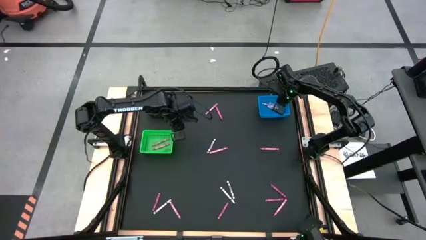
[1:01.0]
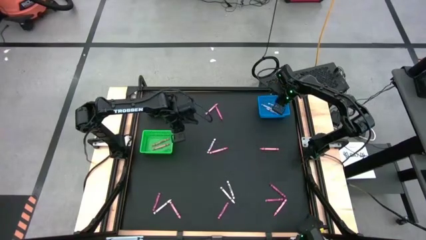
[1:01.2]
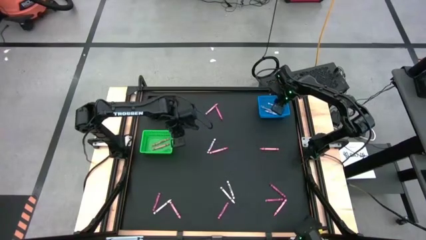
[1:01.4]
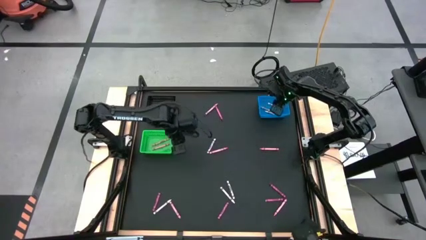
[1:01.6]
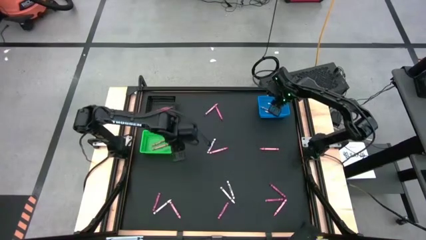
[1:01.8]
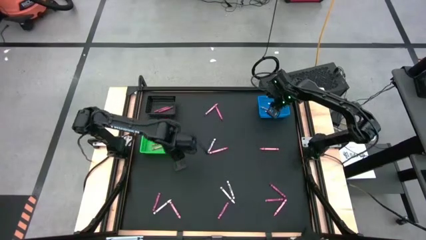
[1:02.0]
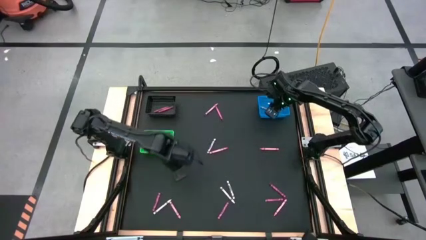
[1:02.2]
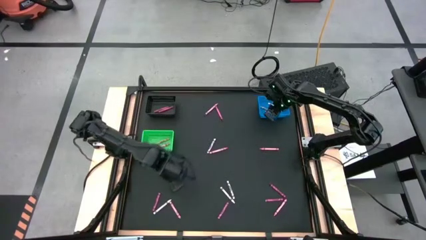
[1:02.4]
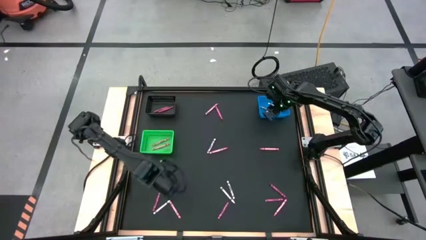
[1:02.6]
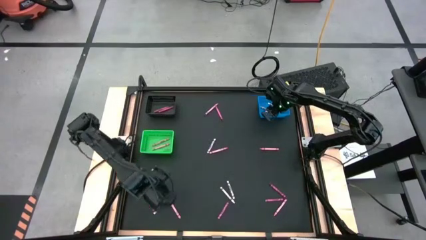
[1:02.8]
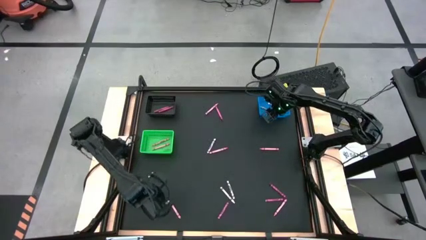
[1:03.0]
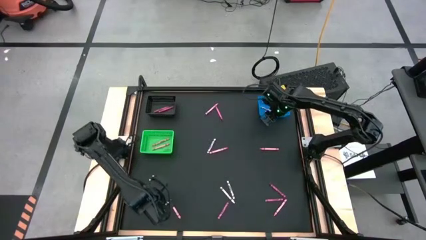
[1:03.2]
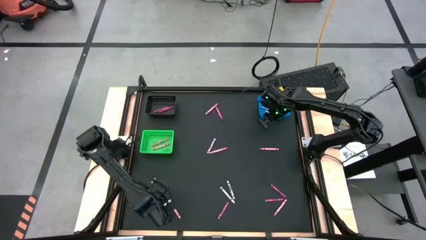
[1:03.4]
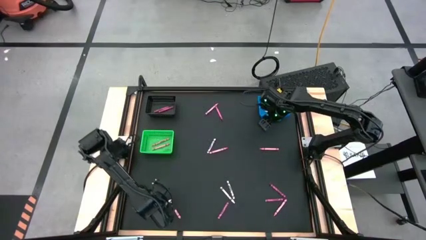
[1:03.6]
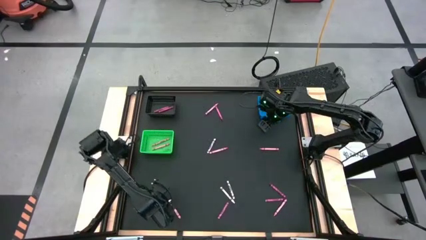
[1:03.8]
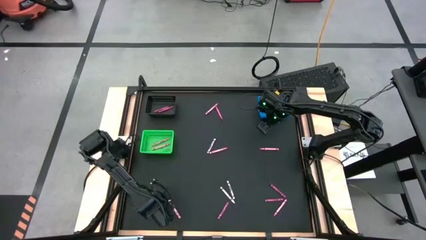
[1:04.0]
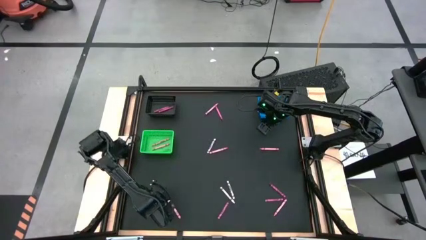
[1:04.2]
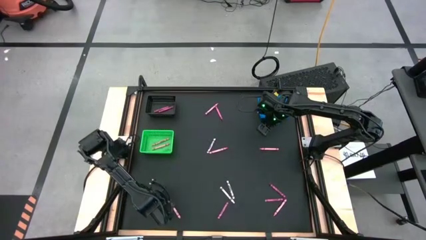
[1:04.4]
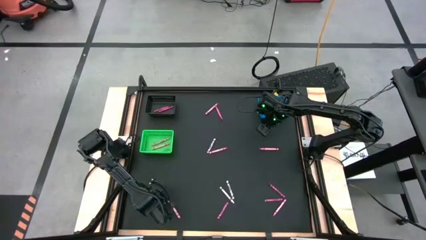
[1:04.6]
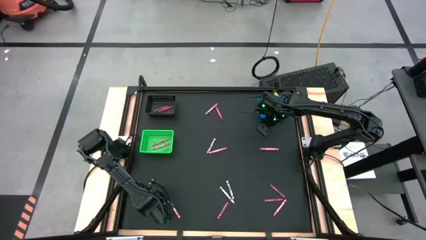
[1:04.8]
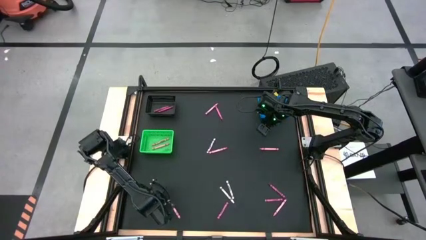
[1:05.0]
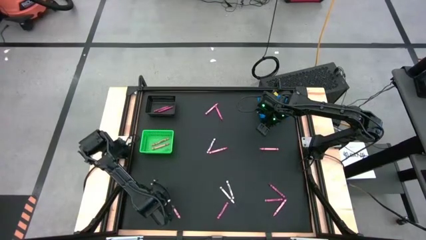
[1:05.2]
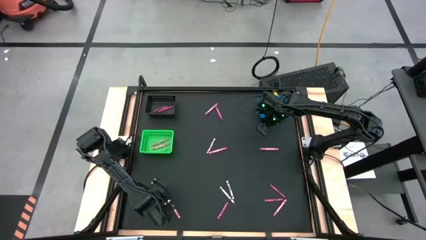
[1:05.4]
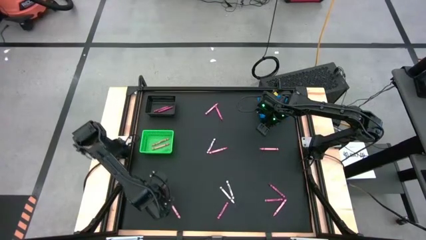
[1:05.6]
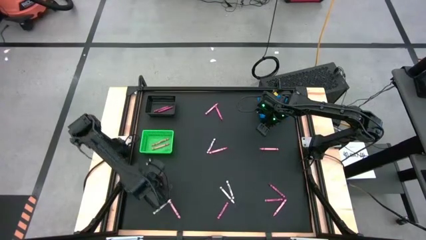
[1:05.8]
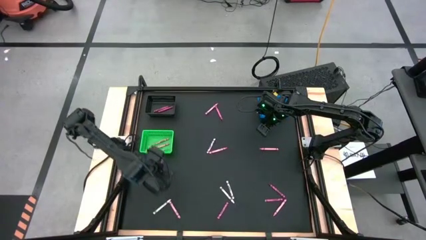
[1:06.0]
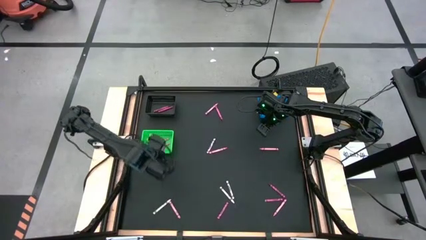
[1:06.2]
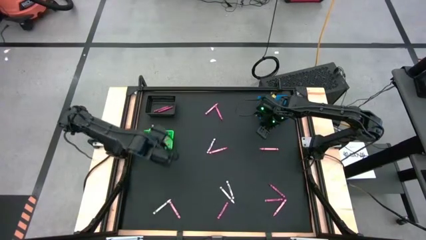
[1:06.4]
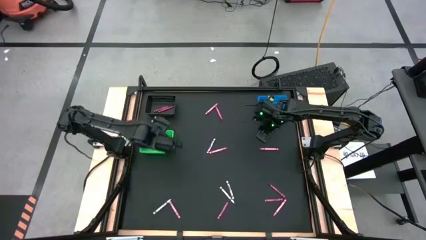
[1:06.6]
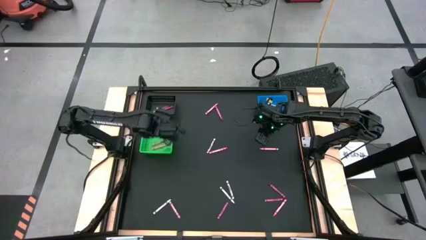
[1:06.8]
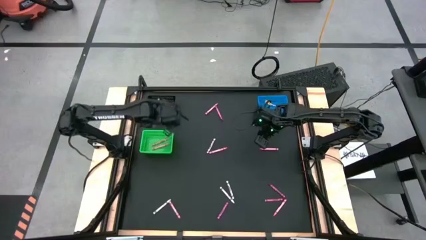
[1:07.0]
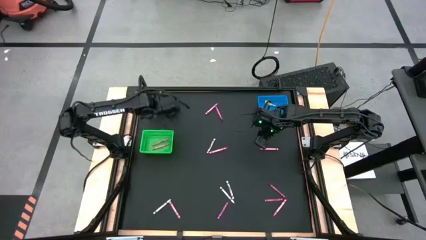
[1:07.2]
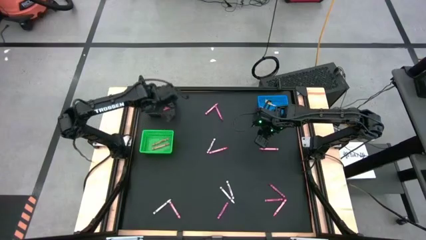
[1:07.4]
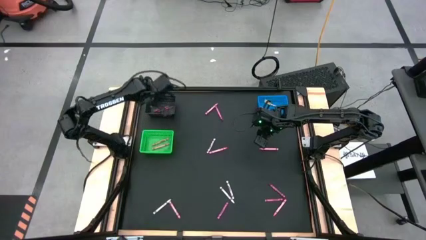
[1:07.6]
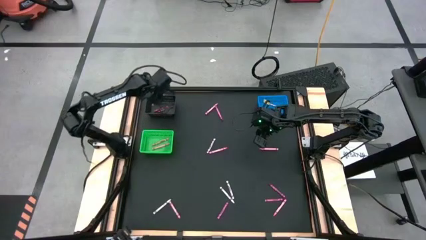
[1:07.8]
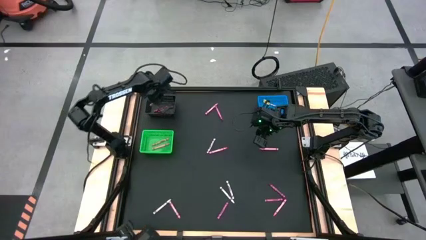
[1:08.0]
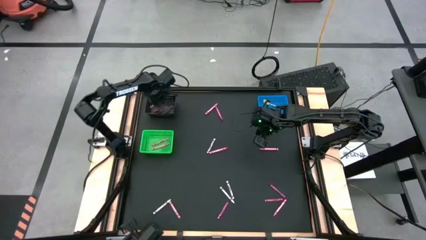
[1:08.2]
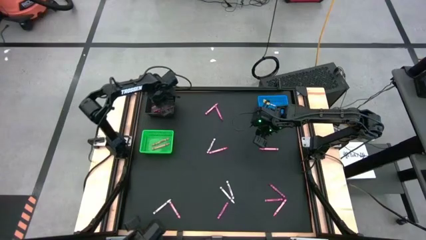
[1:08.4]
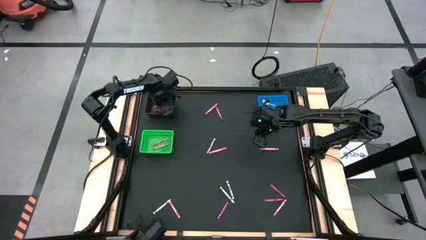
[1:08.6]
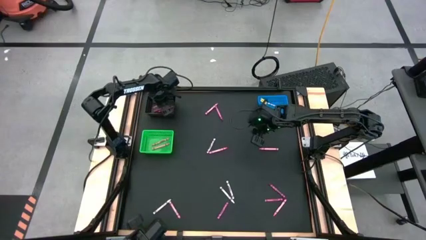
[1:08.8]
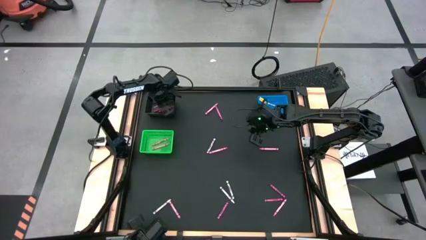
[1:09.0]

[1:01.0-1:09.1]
Task: Sort crayons
Put the red crayon into the black bin

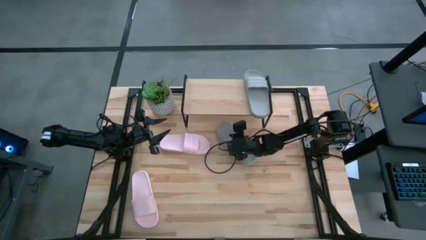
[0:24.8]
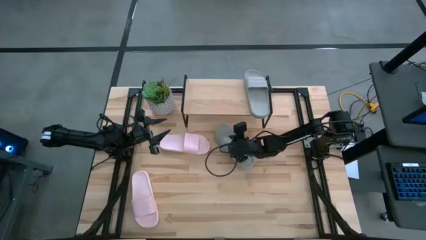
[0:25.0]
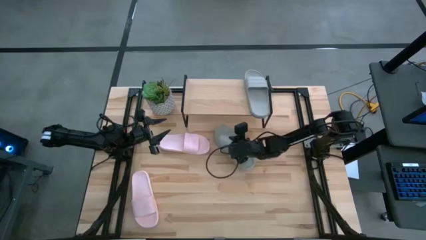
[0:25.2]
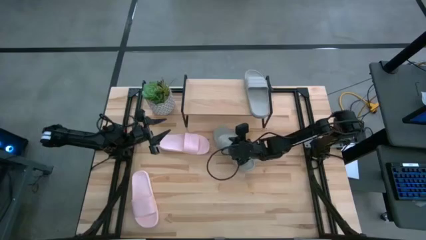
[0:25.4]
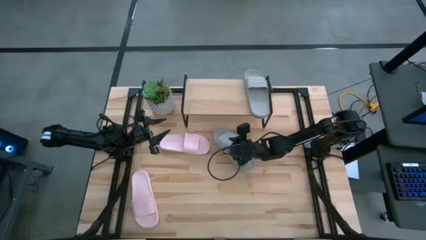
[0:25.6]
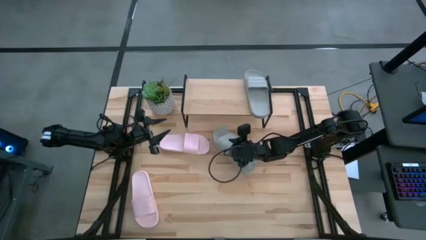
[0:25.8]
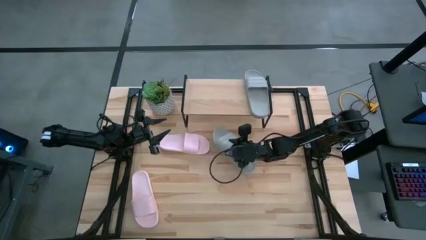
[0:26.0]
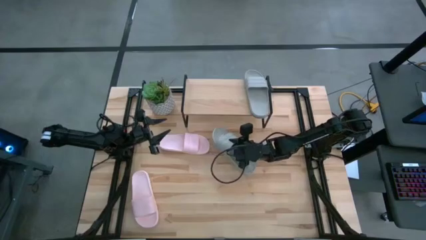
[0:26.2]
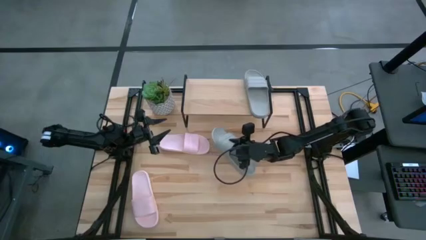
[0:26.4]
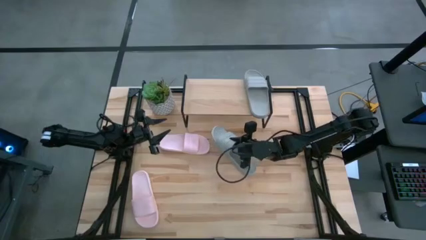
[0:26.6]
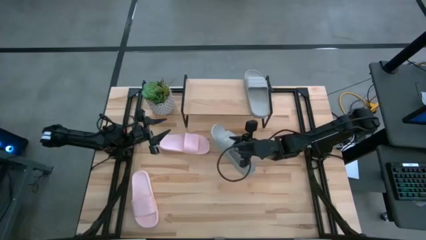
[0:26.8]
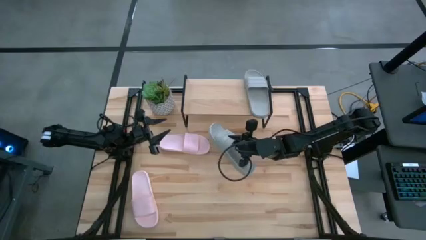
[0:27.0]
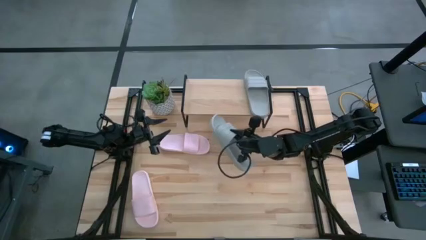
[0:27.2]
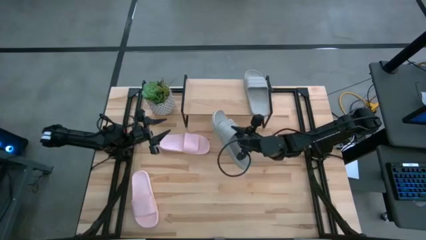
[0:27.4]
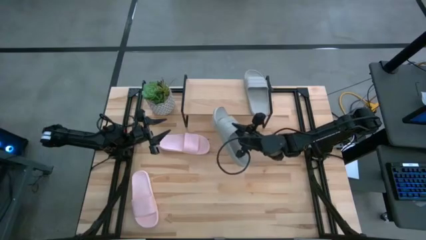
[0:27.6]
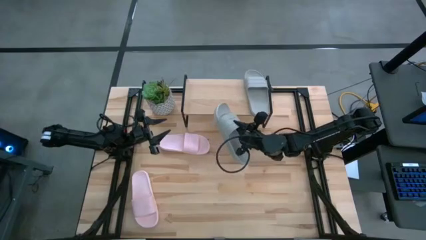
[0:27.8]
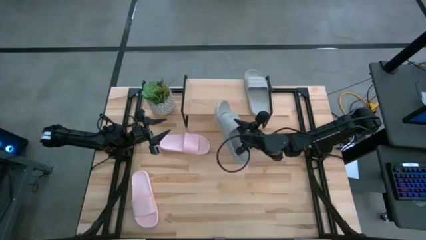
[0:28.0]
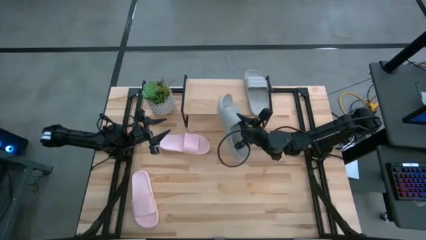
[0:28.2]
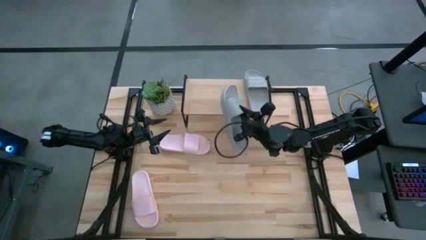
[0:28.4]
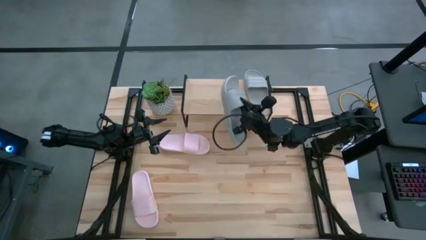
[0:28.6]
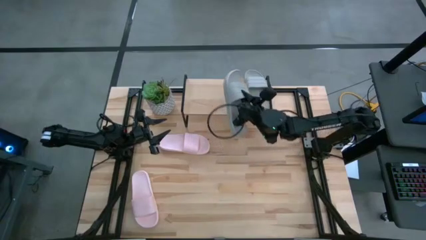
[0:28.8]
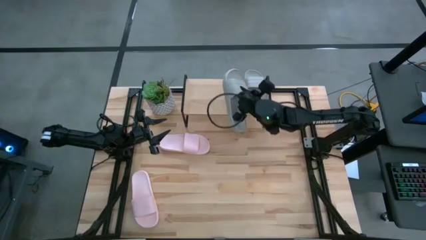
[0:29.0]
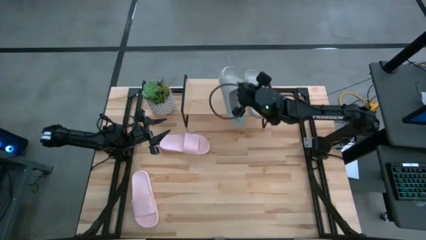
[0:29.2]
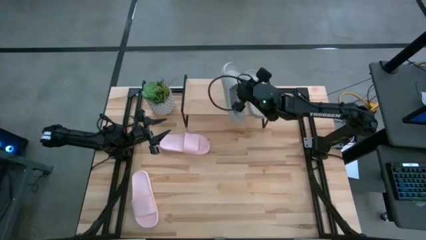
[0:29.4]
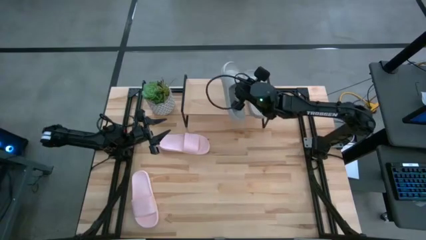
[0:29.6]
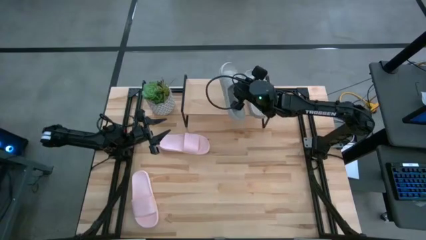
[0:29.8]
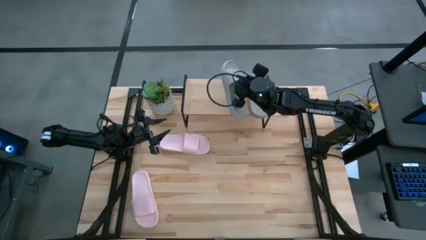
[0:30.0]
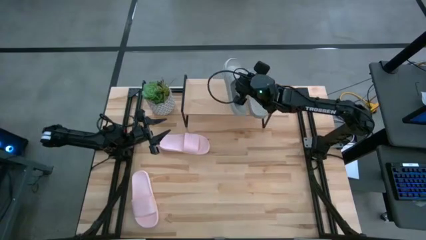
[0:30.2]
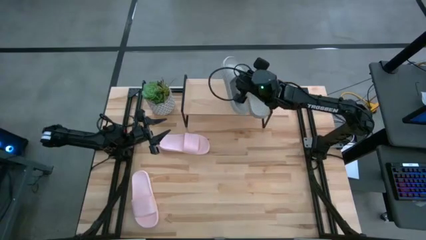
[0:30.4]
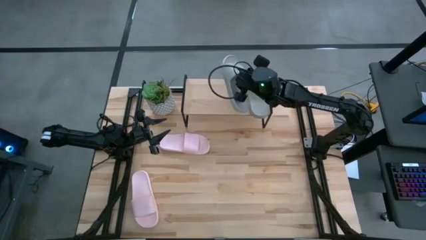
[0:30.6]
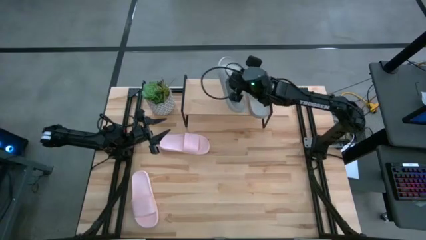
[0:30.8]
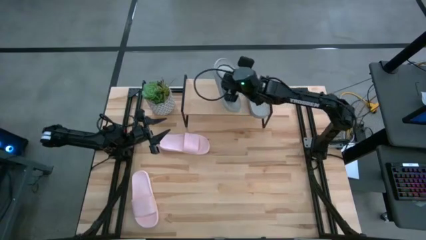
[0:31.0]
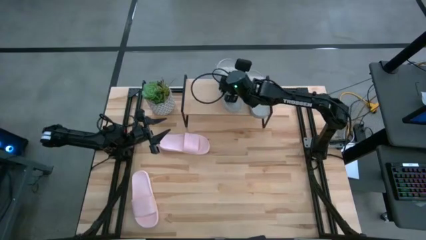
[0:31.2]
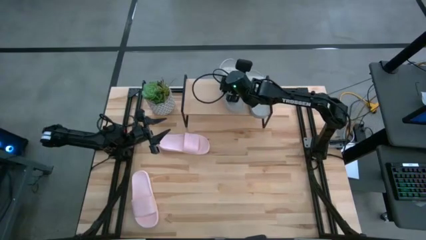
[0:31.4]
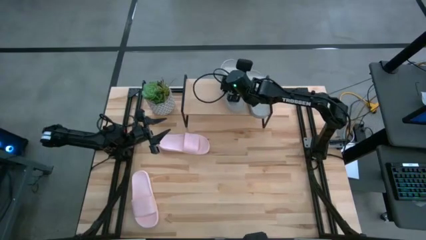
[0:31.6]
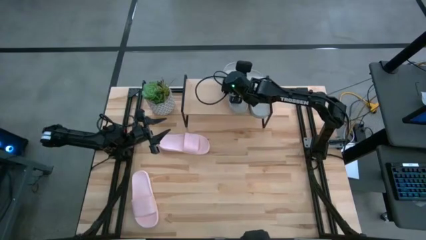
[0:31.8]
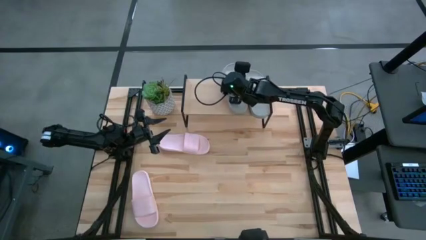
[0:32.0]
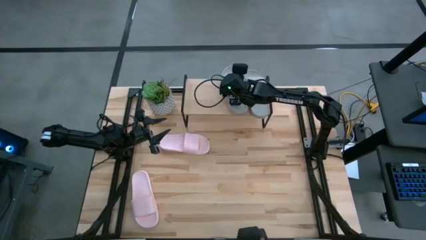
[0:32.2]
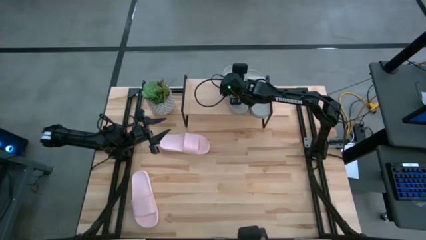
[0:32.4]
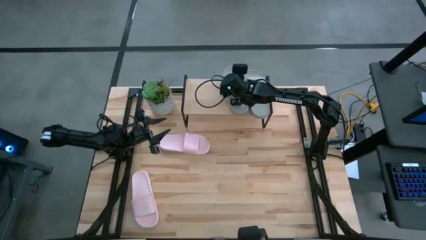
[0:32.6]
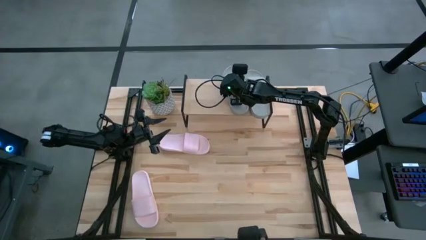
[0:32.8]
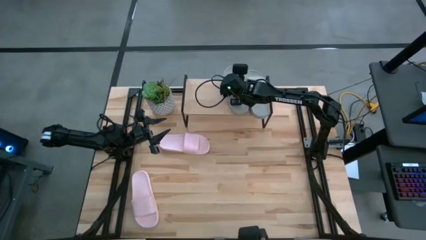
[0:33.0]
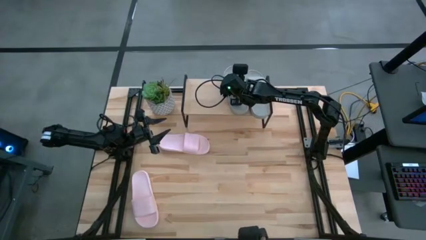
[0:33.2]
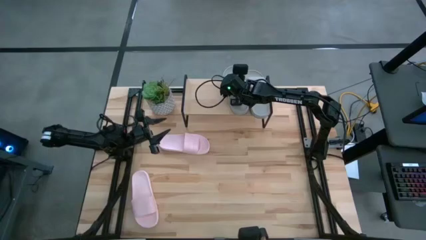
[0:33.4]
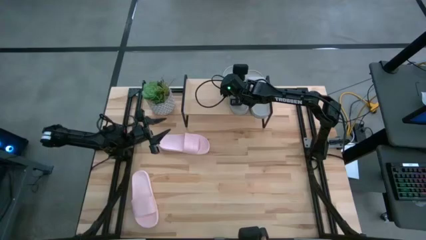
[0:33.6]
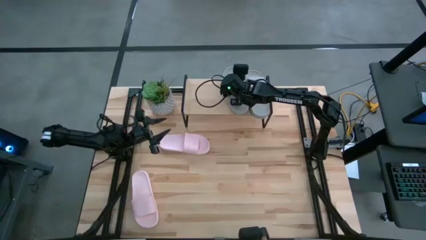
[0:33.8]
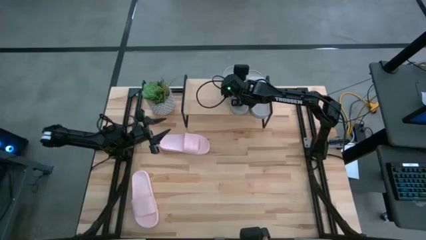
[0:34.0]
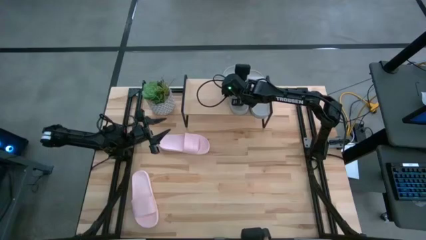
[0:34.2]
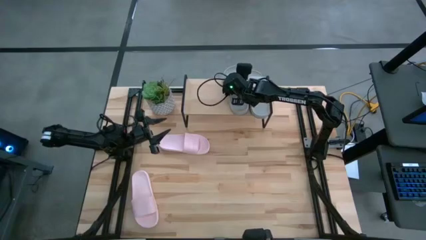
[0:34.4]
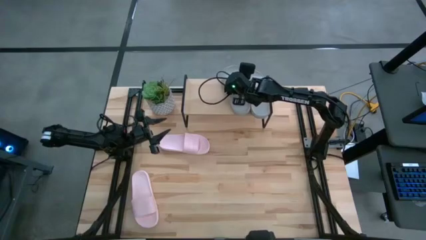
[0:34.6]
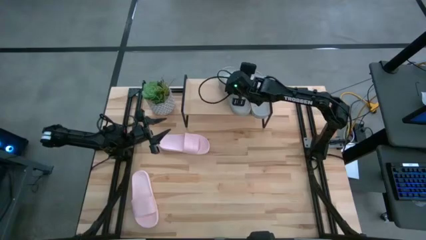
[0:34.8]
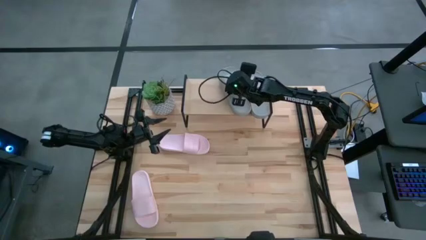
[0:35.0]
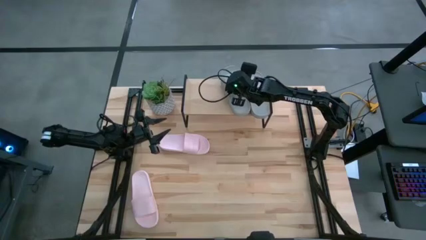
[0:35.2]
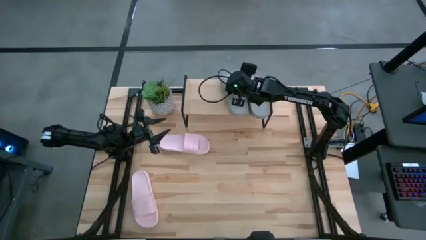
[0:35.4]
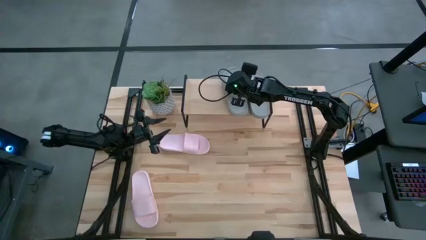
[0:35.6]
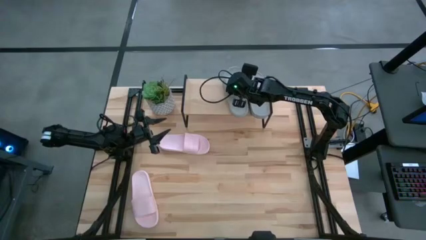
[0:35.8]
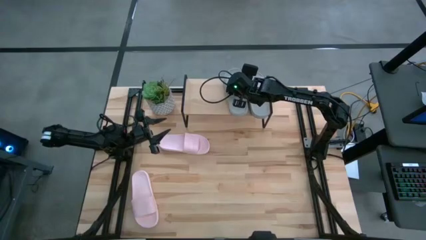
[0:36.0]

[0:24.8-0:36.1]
Task: Pick and place slides into the shelf
Put the gray slide on the shelf
